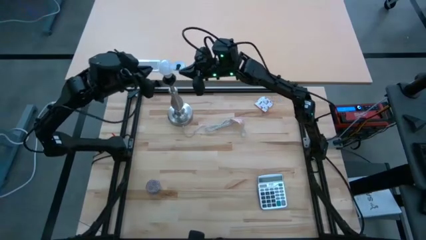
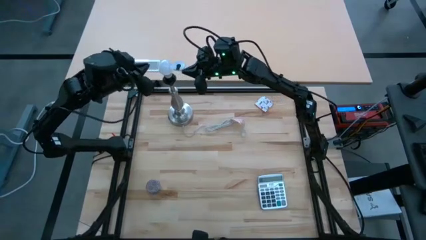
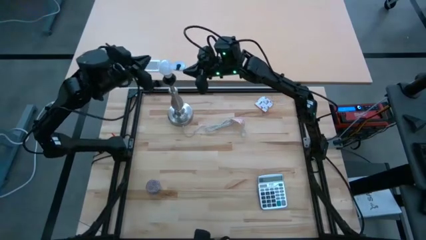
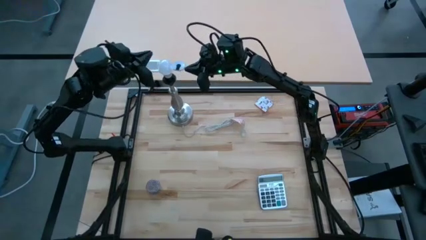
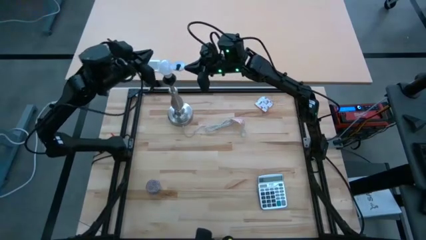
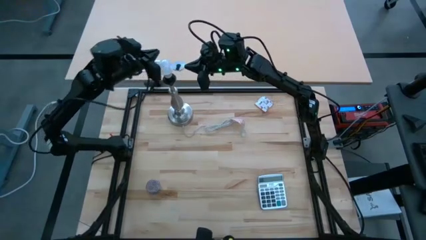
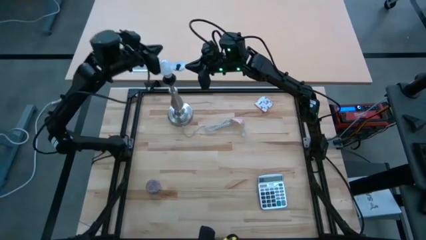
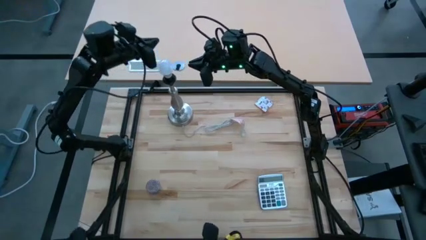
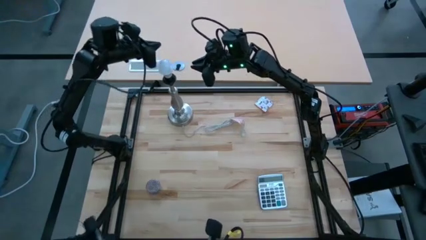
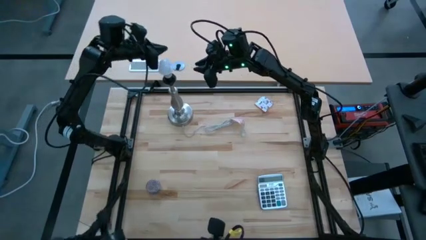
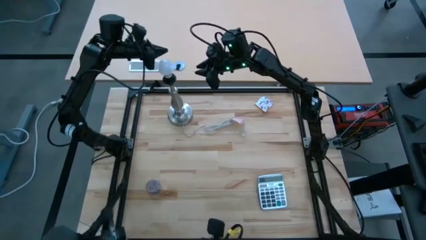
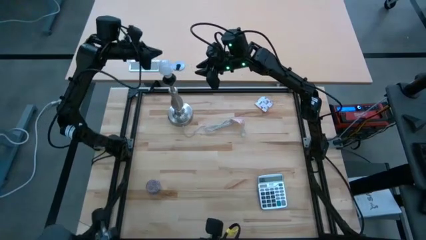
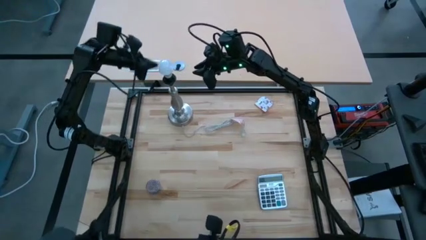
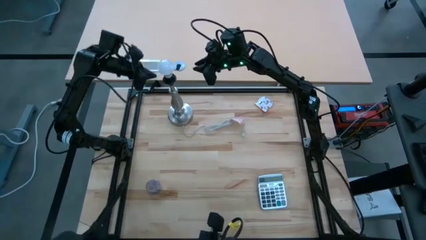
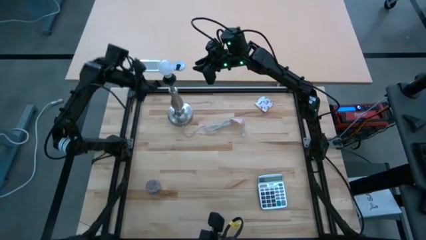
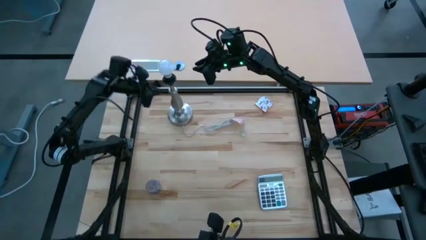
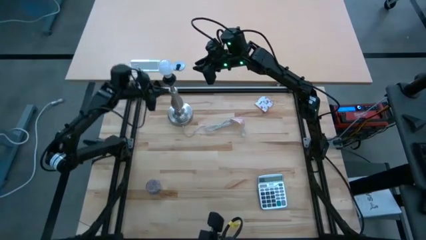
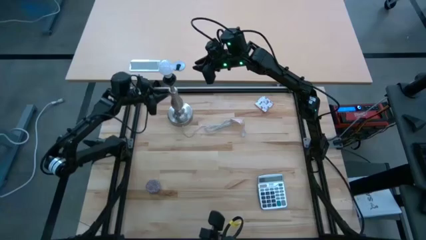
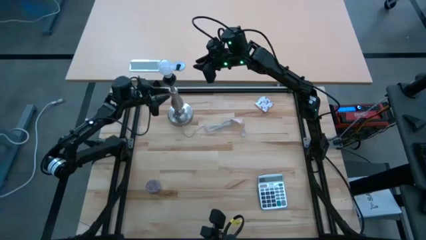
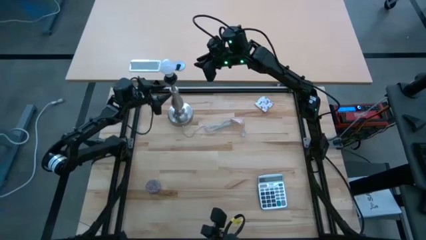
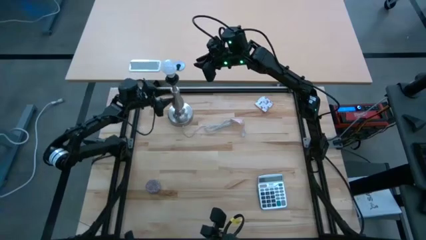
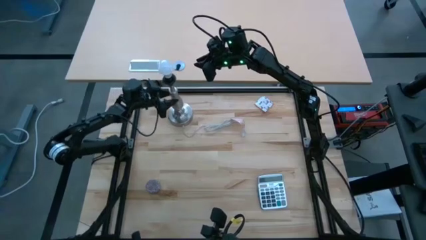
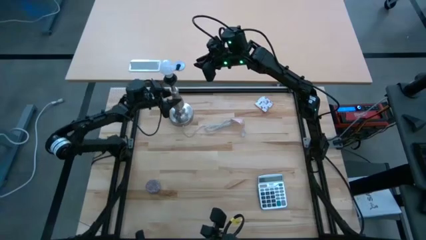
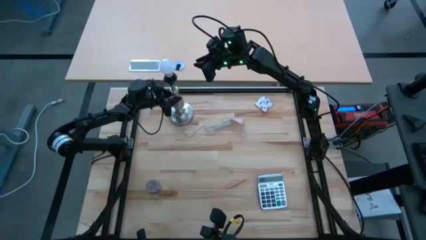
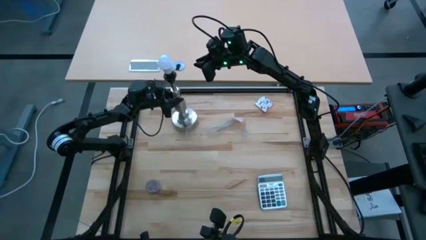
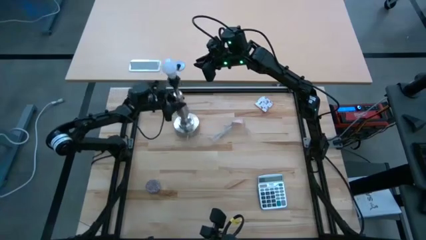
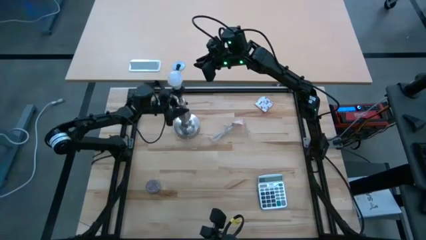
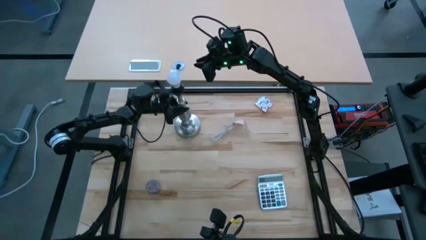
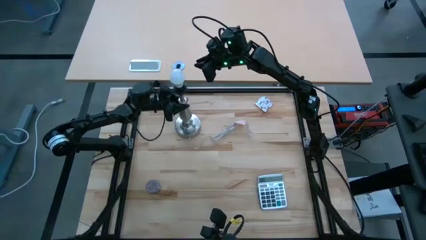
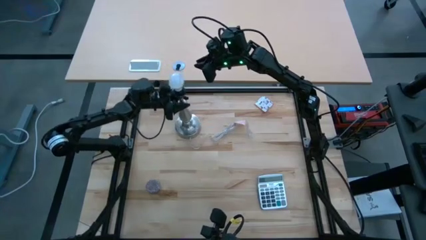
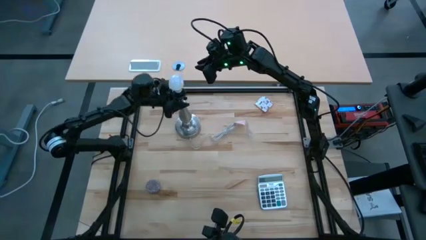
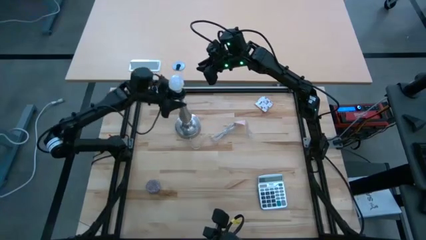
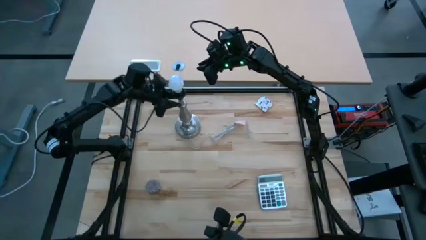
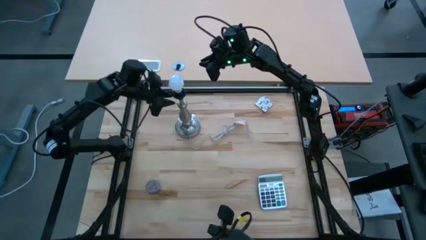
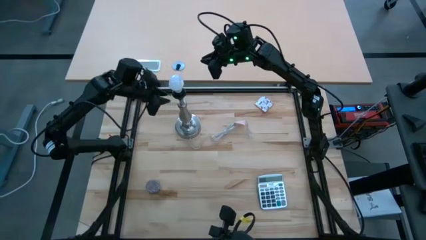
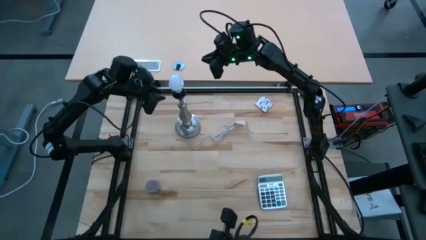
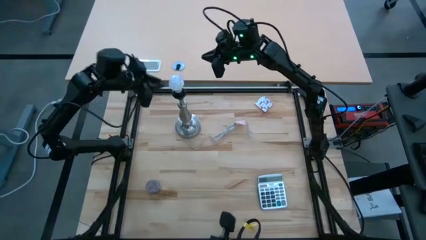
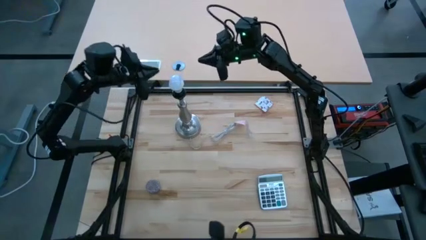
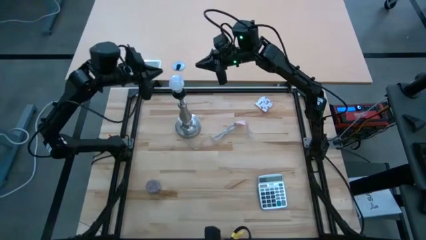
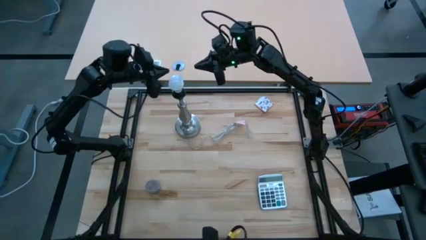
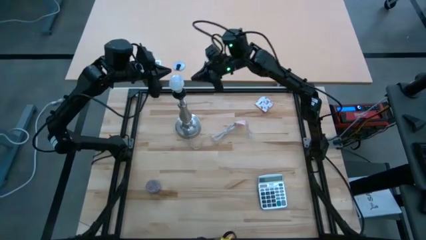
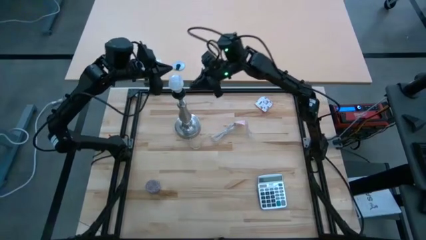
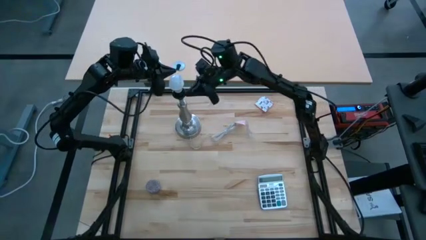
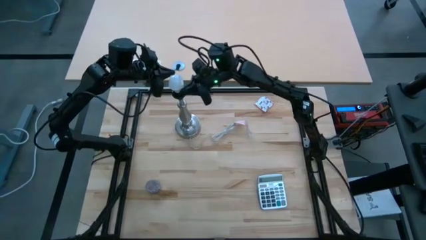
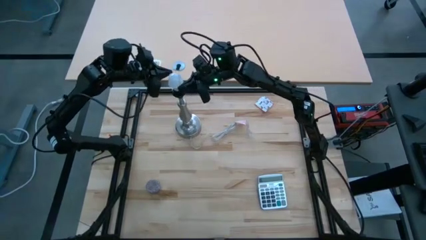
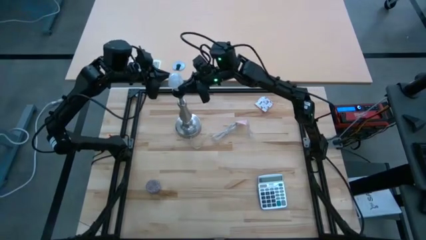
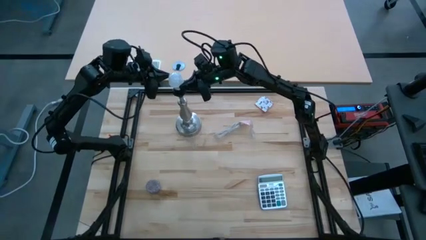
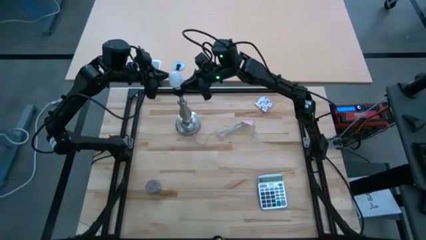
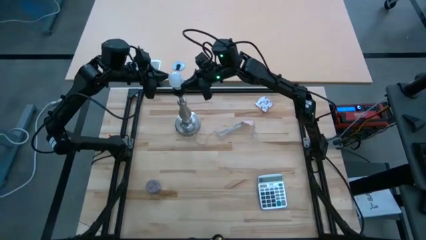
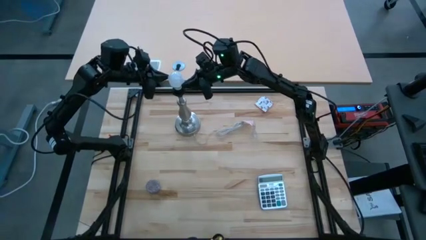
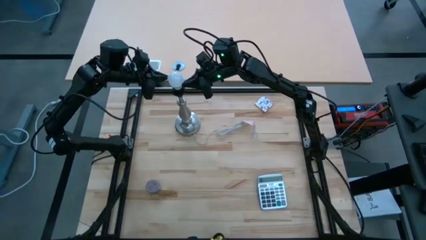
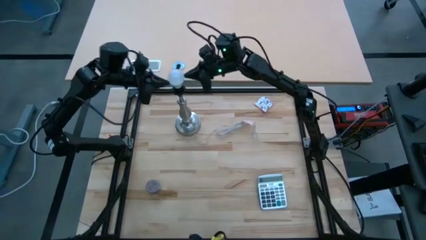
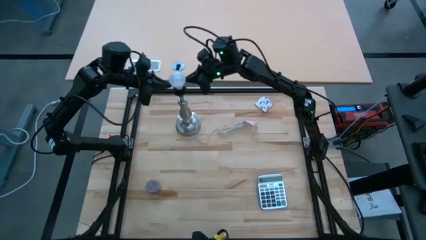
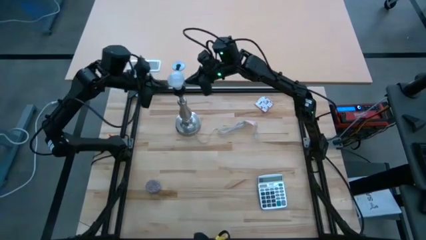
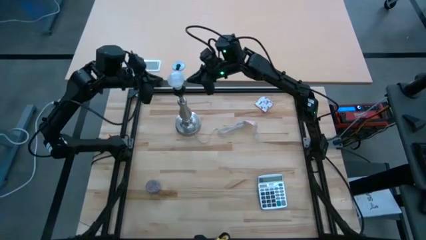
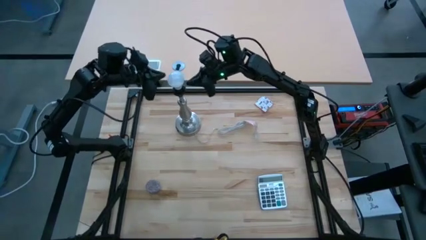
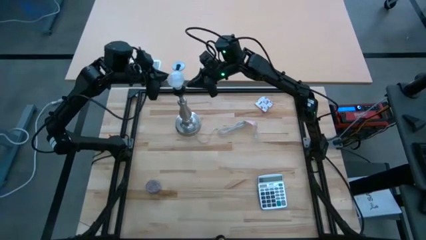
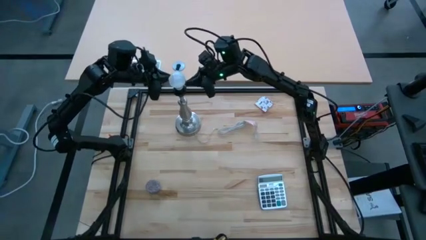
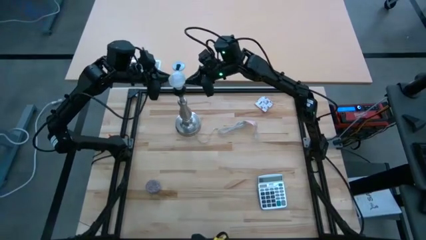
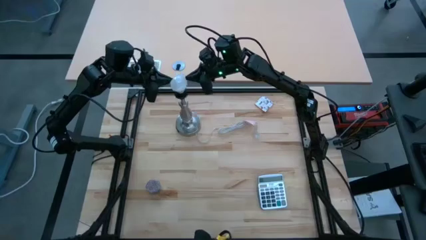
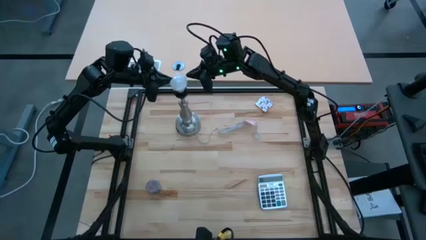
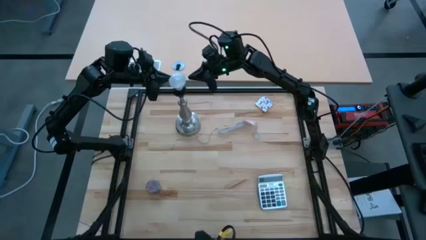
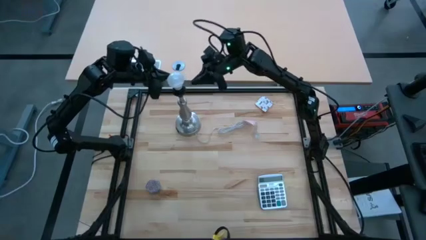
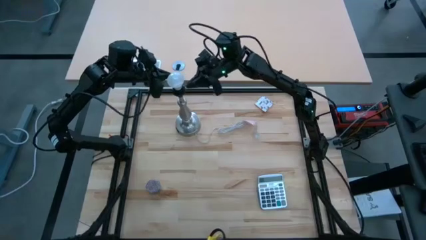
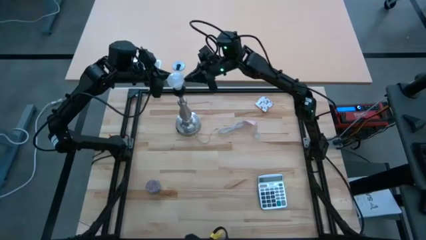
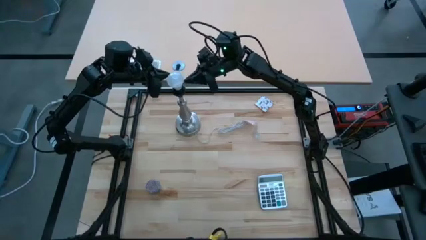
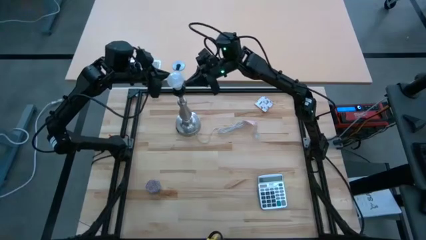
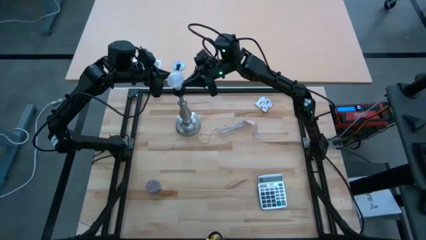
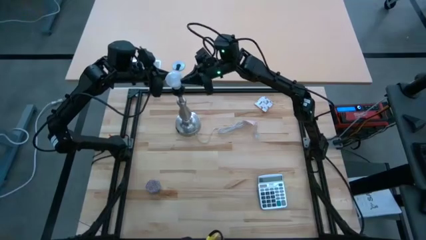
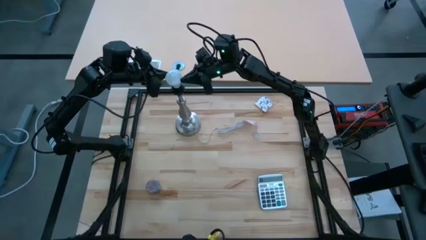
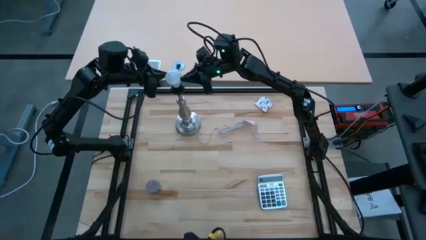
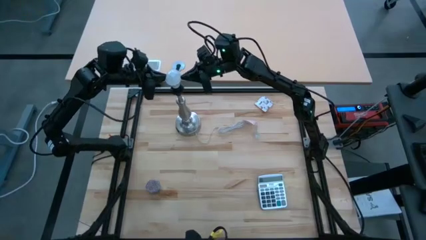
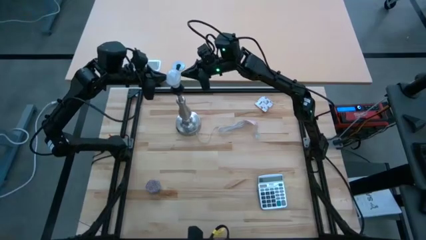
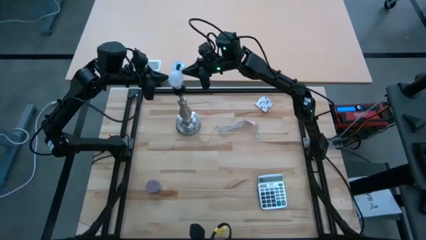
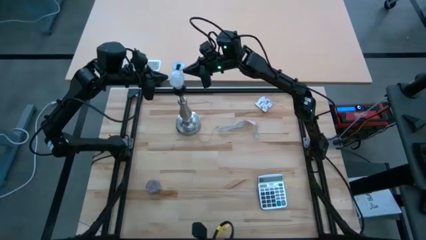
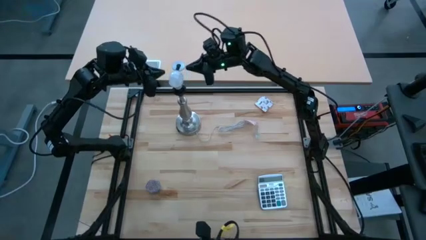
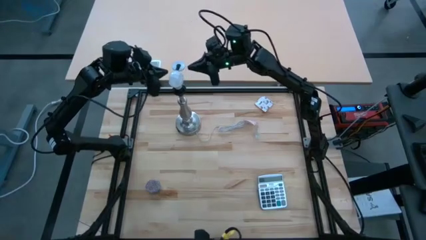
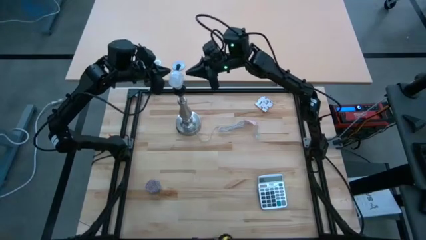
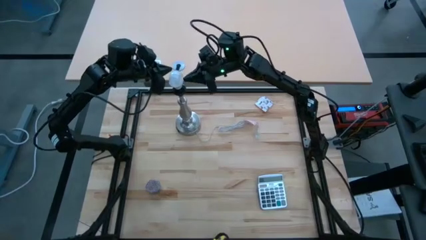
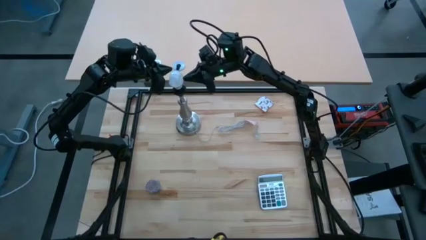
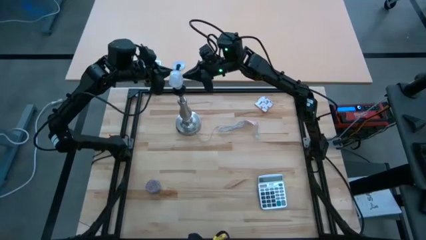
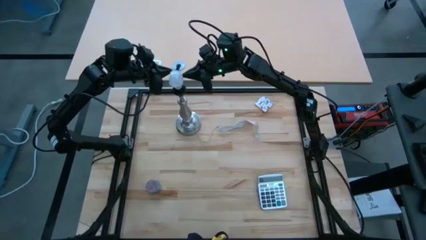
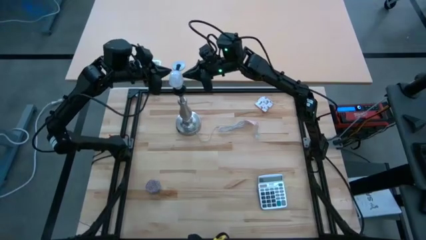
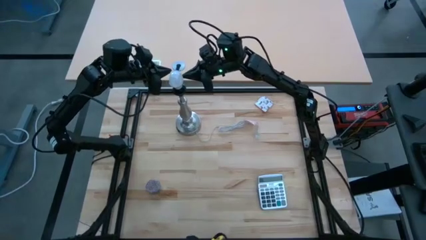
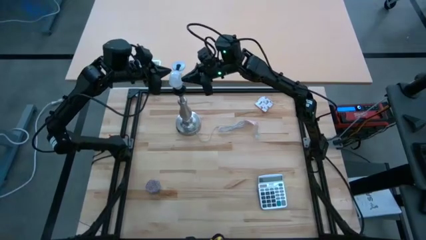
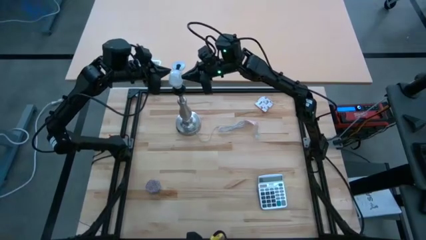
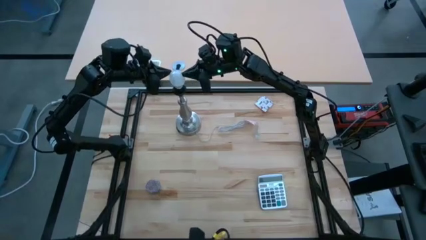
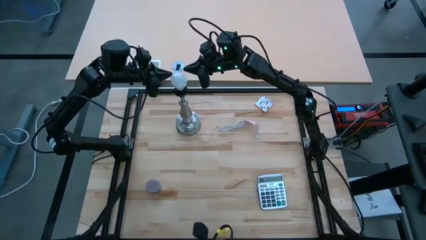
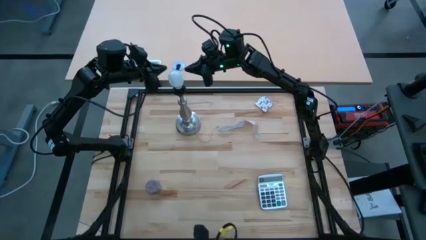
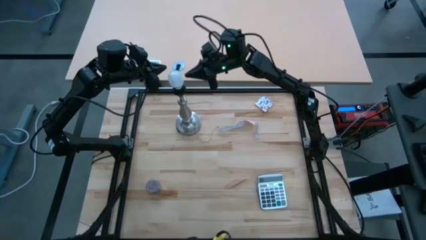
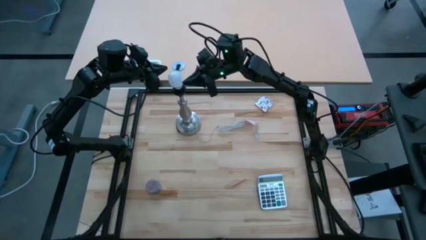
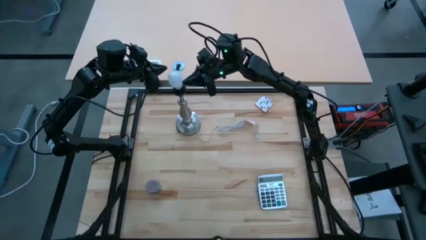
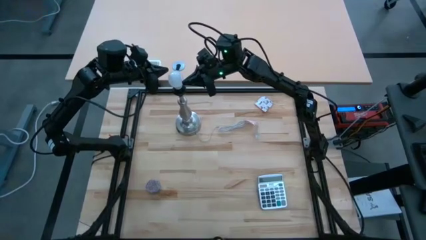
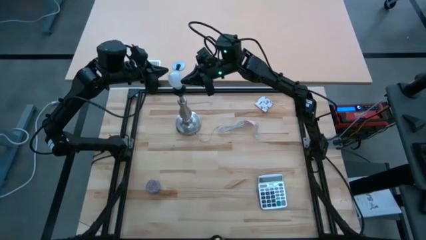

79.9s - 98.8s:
Task: Screw lightbulb
Remove the lightbulb from the lamp
